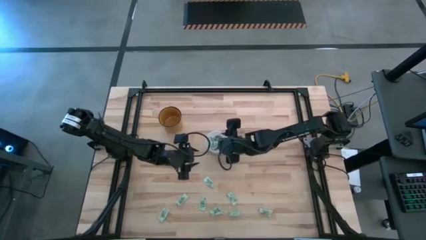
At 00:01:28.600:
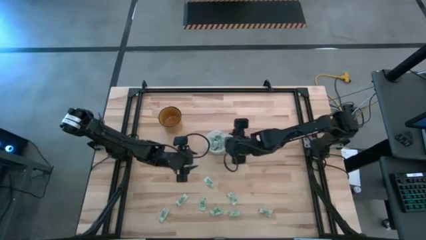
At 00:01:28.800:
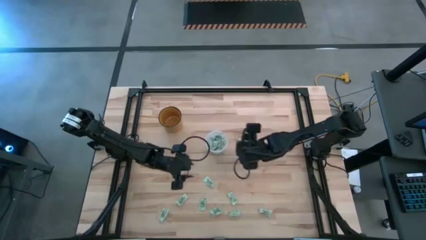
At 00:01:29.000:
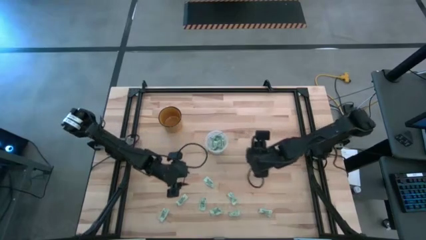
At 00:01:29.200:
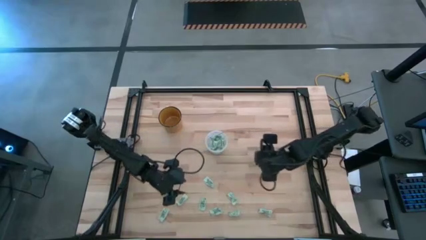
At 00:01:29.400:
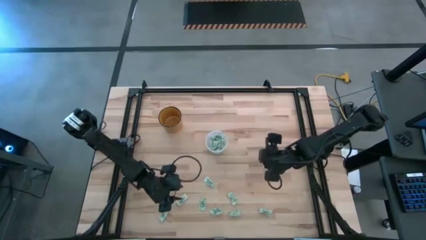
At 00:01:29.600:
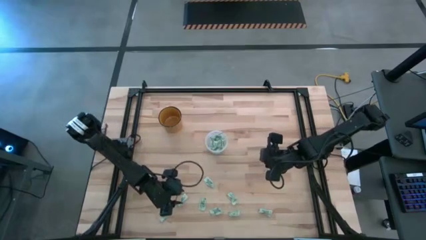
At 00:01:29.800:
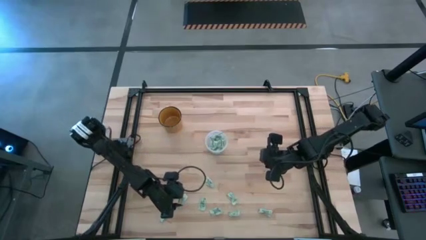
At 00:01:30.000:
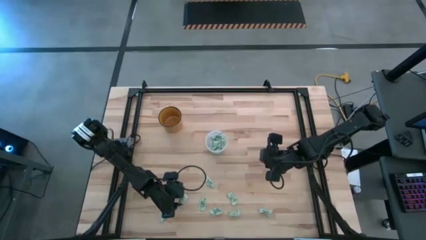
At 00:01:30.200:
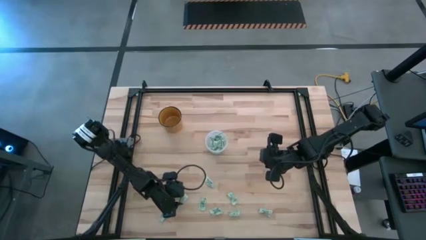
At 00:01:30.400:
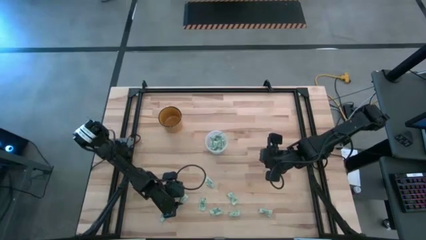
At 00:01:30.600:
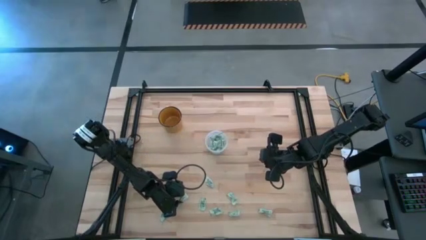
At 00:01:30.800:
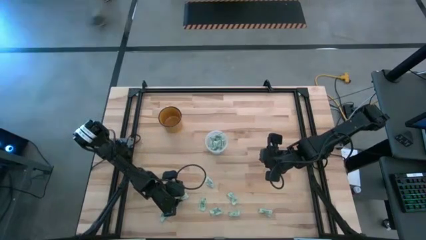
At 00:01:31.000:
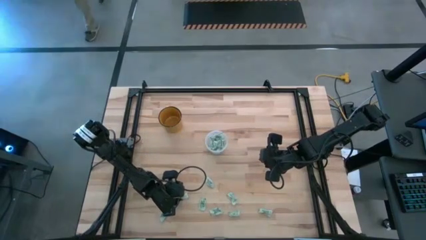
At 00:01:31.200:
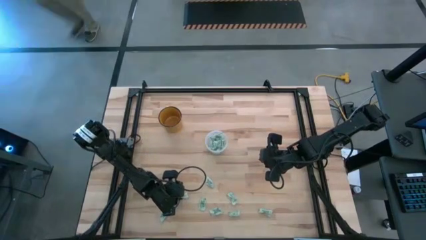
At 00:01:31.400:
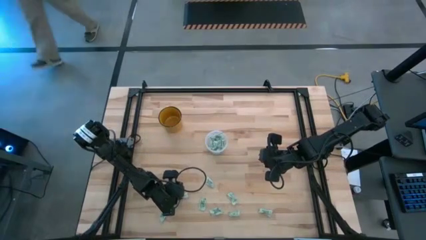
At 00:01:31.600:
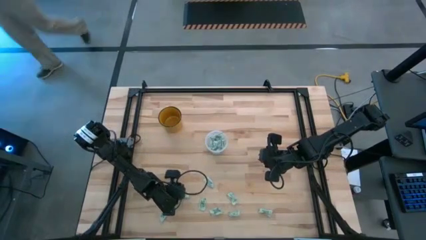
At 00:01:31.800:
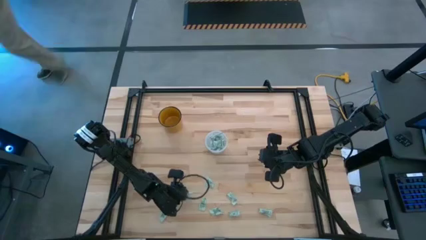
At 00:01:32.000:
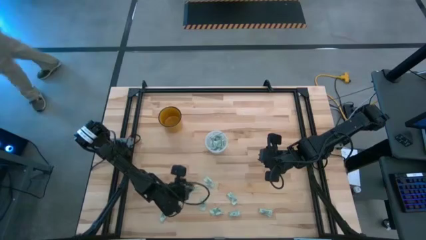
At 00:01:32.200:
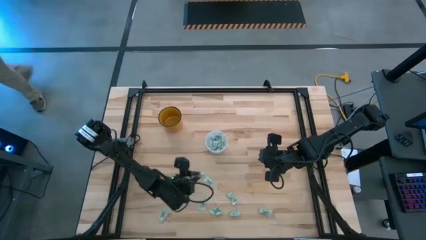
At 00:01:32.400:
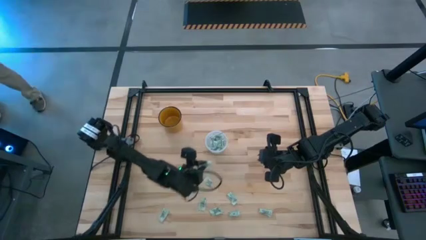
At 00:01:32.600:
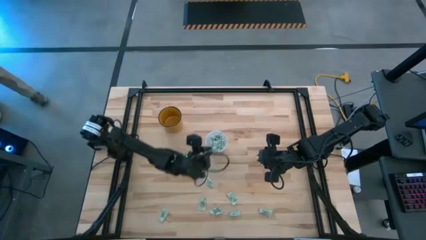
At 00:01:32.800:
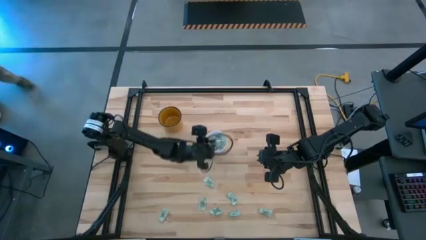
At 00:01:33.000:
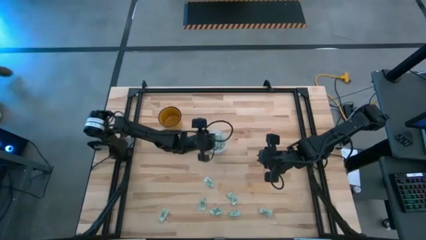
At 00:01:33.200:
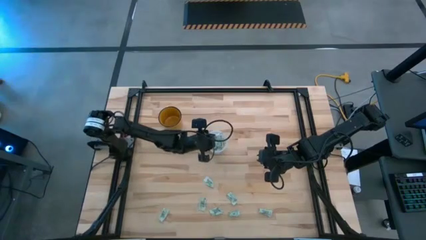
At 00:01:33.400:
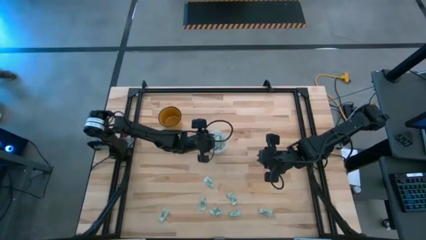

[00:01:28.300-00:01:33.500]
Task: Pick and place Stevia / Truvia into bins
Put the stevia packet into the transparent container

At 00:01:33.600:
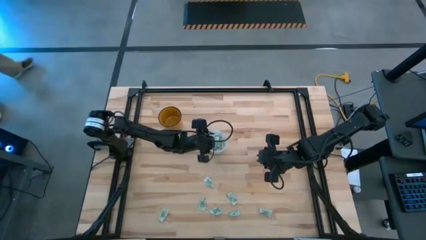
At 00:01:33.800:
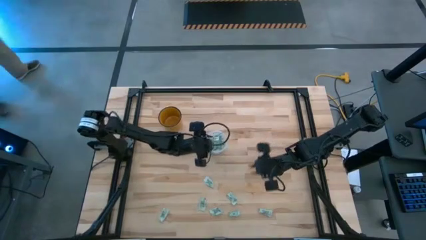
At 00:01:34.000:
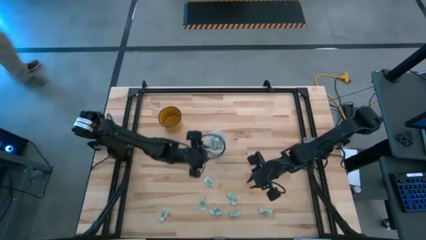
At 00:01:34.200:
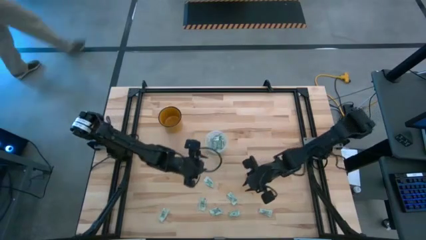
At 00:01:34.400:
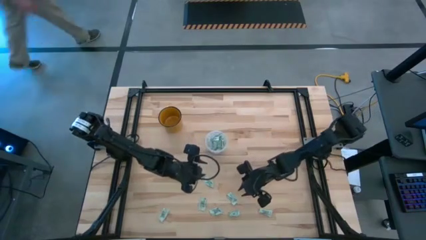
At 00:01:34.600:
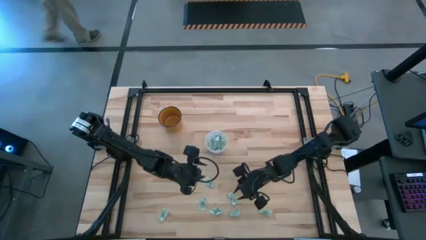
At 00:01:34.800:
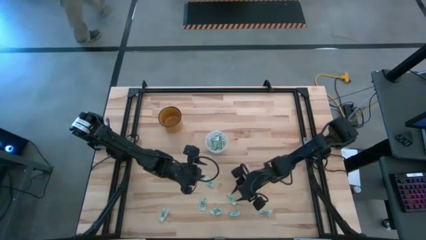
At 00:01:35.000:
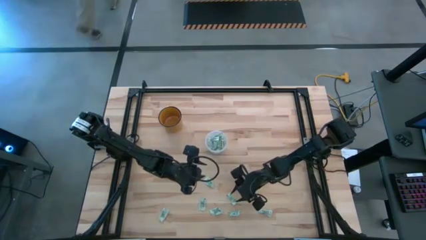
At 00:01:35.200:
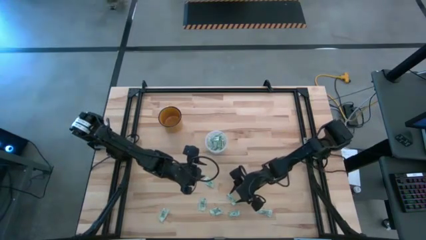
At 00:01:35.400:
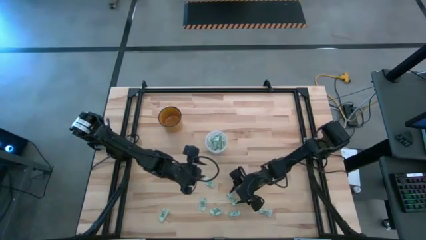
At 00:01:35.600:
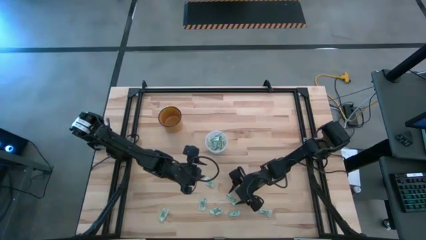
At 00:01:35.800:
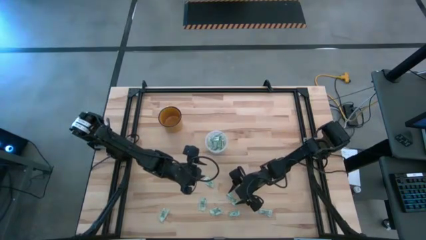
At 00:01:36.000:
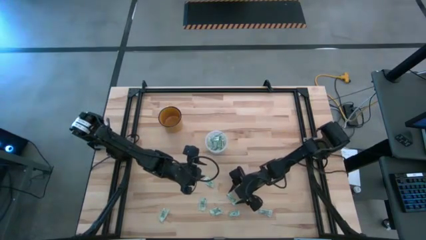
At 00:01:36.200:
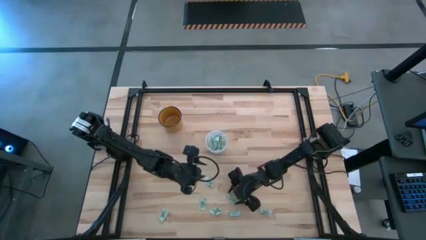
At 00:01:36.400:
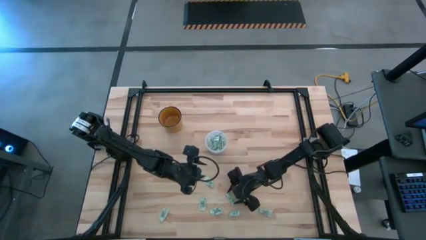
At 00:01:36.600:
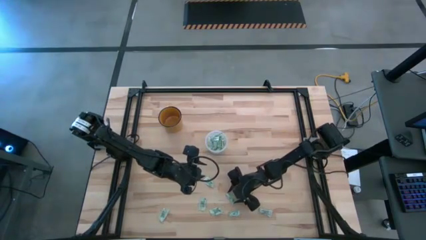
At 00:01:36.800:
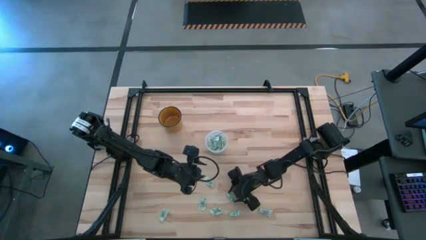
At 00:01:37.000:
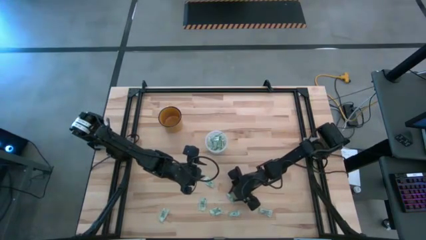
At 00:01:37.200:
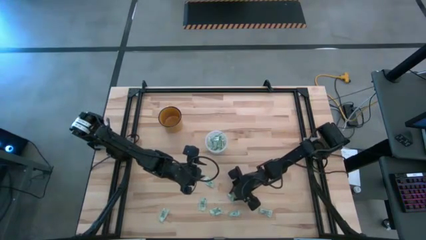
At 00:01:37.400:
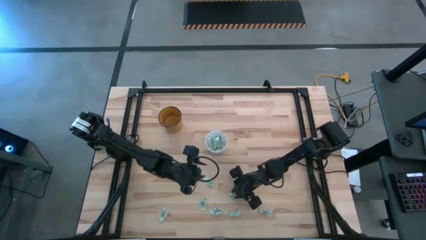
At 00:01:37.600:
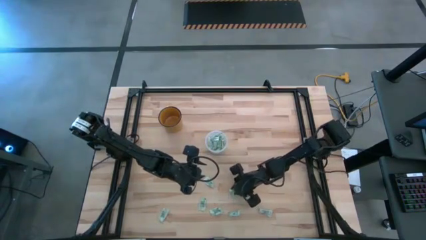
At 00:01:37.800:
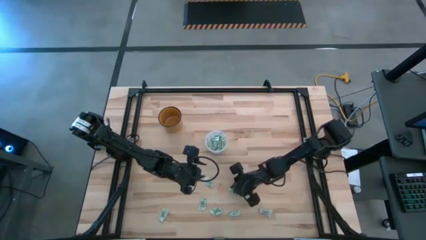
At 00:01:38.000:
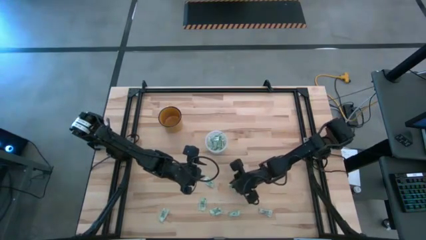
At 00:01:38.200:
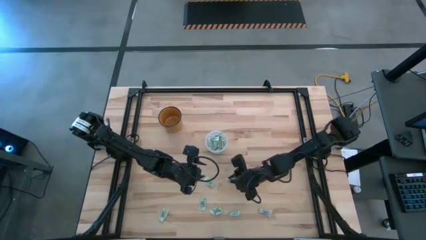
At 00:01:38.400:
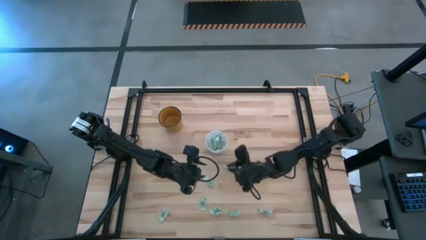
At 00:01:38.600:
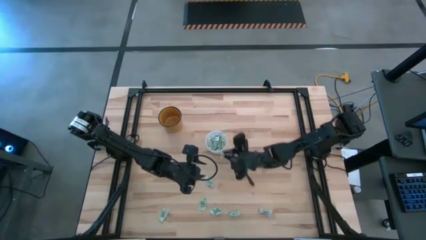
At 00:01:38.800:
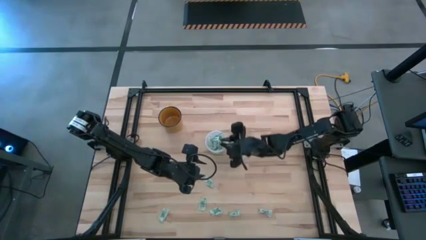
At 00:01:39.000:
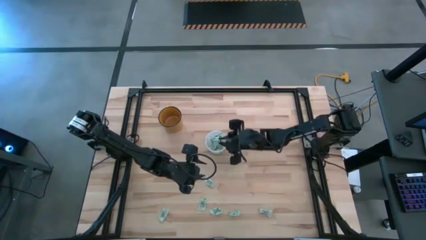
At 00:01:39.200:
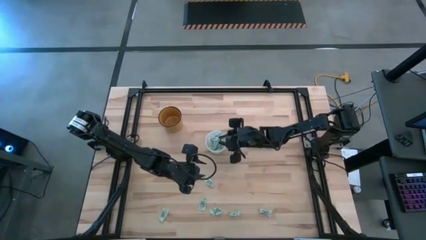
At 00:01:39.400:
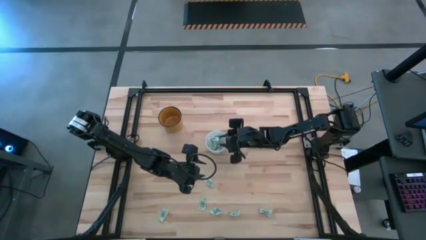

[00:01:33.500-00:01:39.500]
Put the stevia packet into the transparent container

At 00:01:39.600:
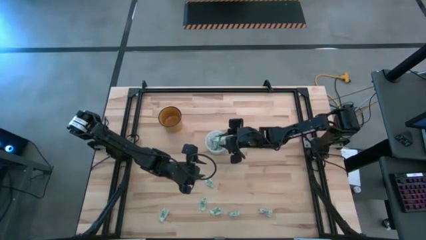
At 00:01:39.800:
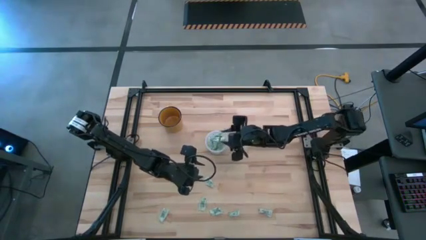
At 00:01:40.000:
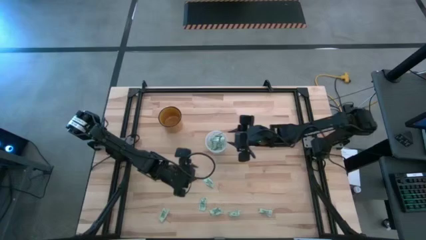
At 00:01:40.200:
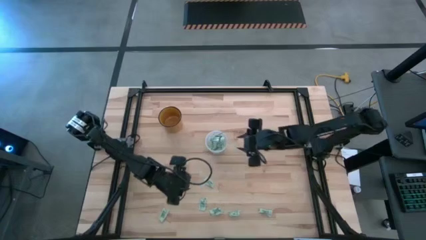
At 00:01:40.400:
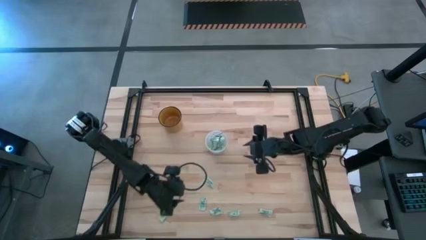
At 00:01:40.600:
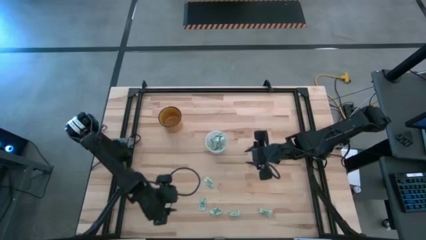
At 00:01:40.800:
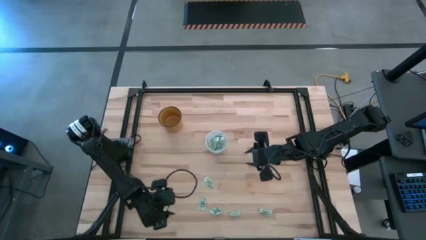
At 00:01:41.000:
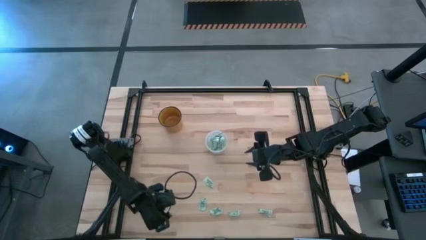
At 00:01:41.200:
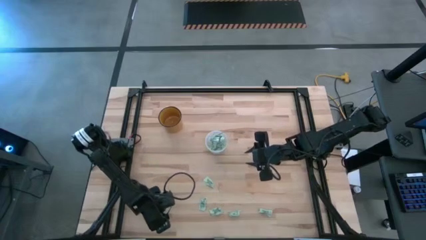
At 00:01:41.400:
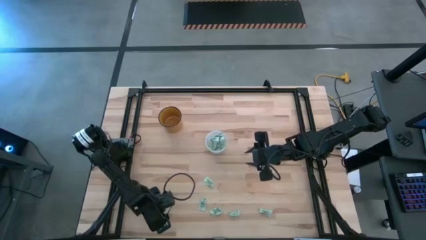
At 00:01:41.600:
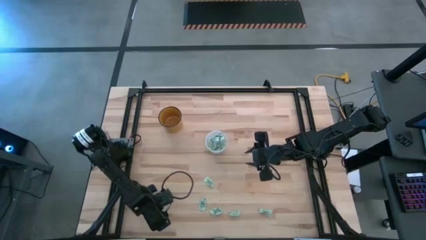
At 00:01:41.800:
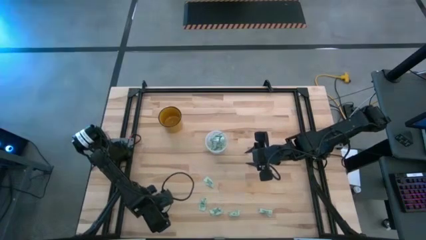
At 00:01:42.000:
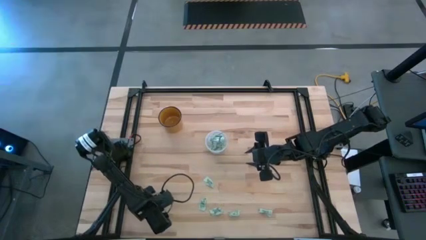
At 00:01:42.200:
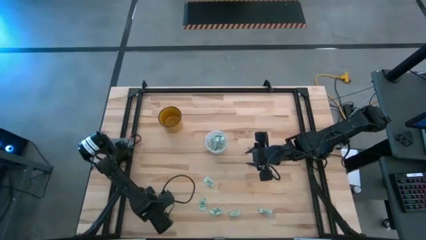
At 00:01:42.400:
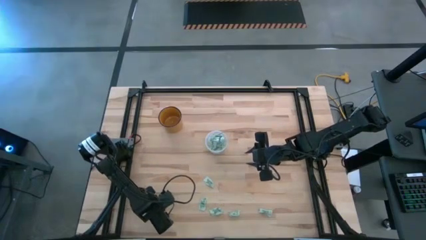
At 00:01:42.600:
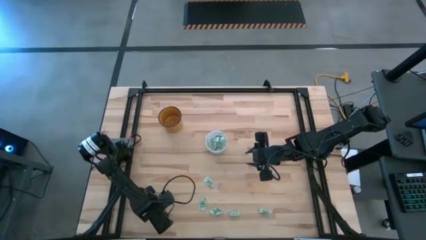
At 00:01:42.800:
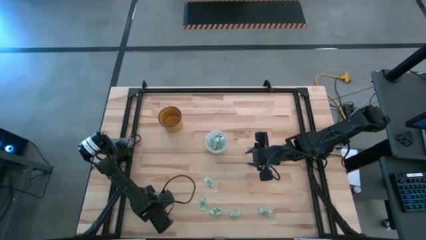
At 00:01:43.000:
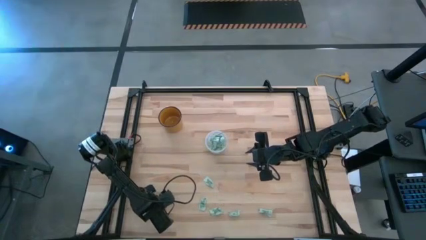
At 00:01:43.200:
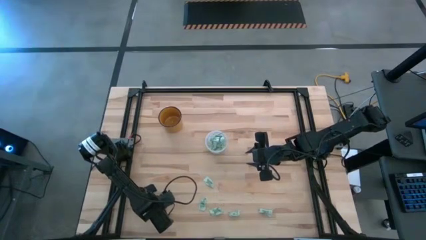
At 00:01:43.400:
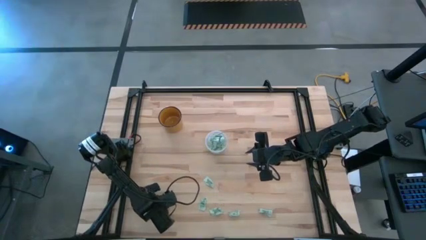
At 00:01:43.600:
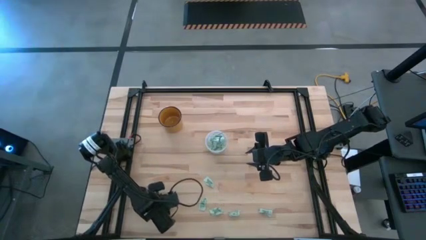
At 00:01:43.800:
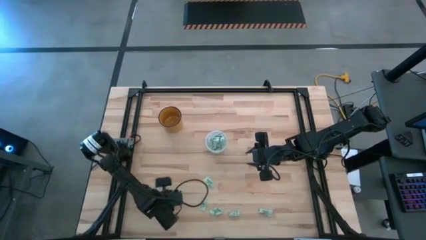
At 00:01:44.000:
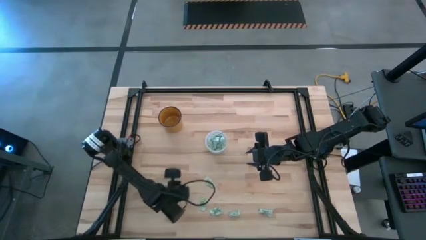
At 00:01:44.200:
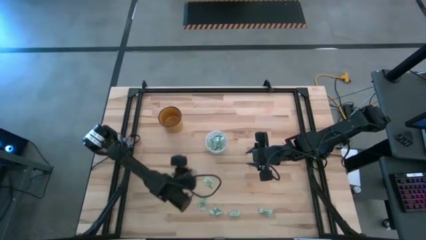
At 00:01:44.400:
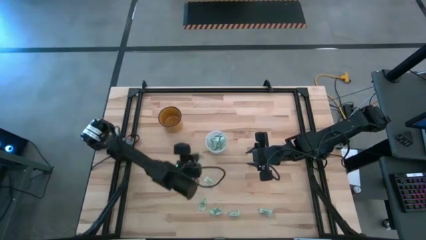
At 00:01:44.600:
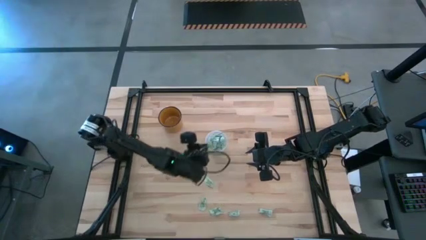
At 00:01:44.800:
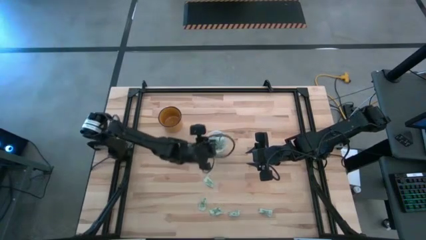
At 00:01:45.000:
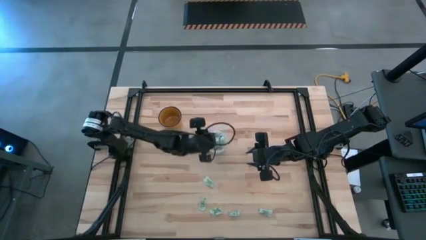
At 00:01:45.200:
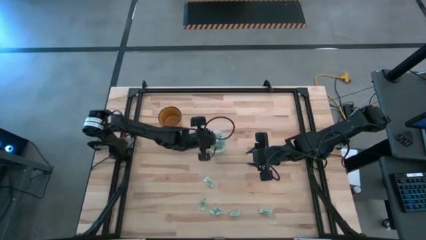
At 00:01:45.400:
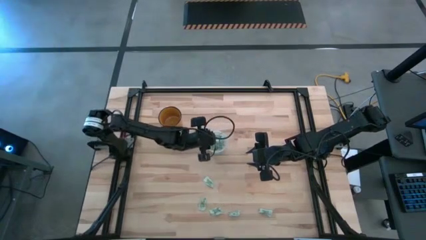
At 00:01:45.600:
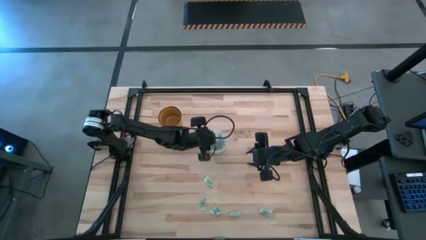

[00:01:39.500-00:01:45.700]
Put the stevia packet into the transparent container
